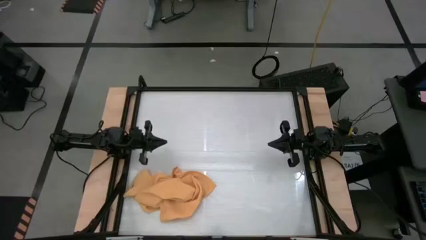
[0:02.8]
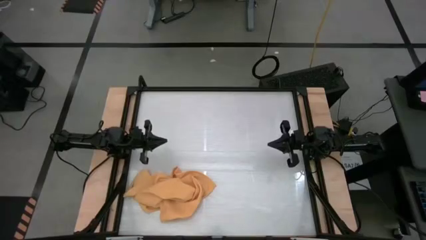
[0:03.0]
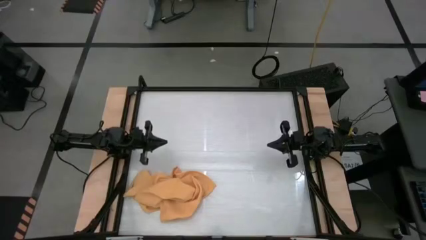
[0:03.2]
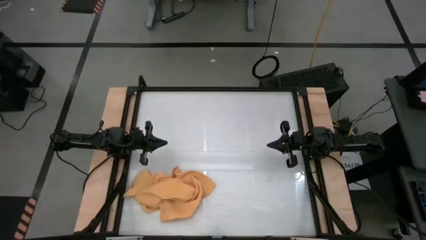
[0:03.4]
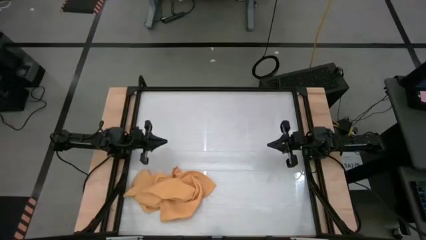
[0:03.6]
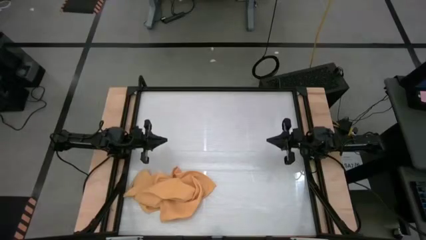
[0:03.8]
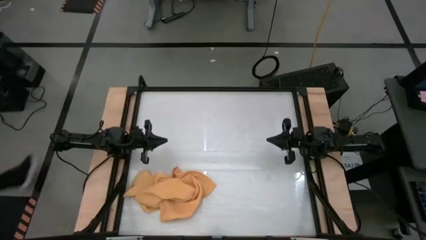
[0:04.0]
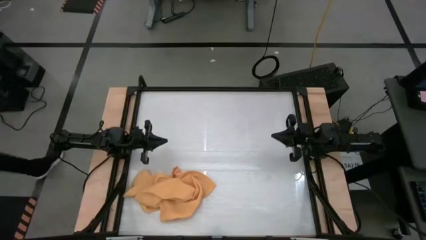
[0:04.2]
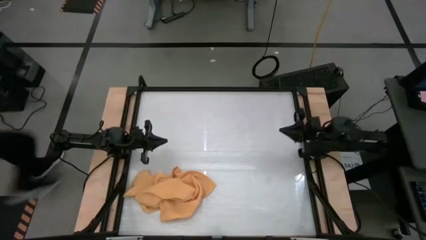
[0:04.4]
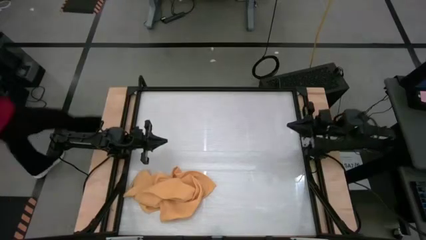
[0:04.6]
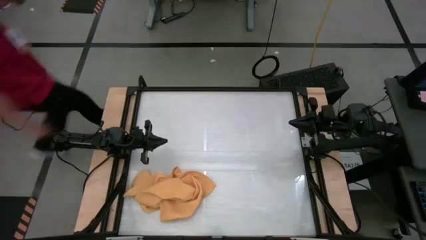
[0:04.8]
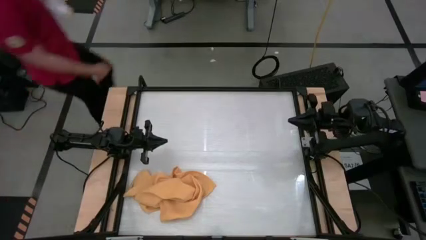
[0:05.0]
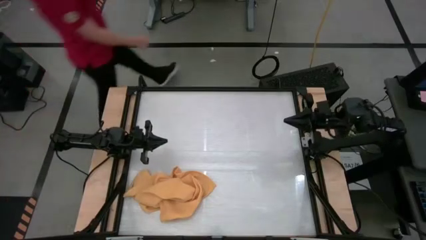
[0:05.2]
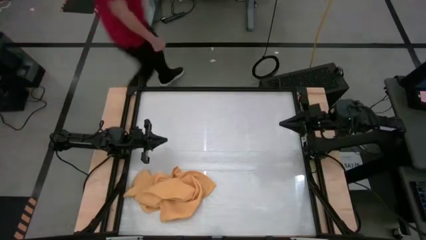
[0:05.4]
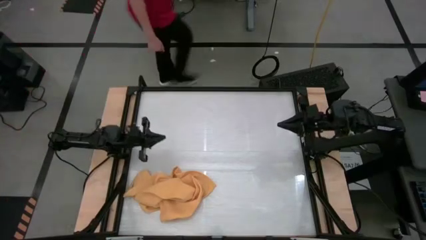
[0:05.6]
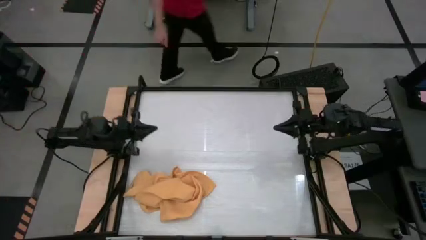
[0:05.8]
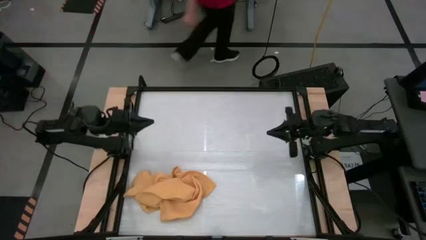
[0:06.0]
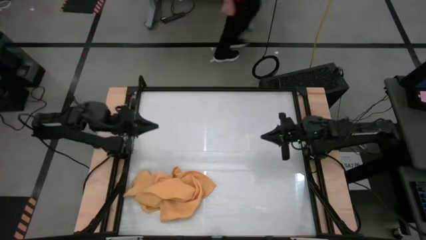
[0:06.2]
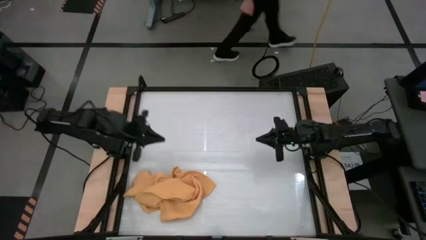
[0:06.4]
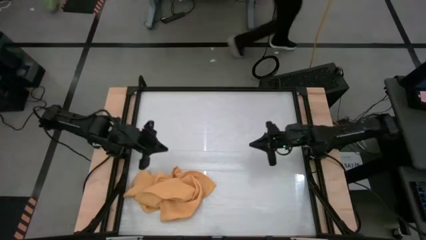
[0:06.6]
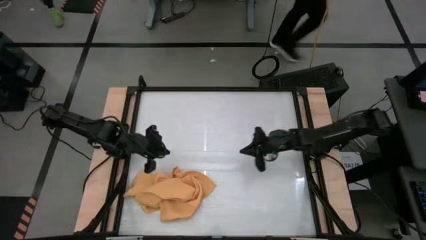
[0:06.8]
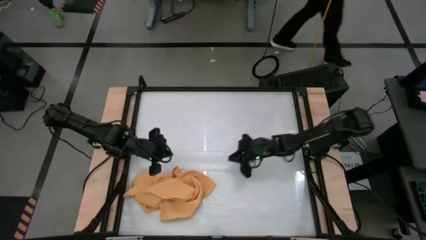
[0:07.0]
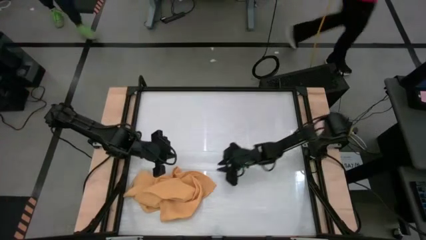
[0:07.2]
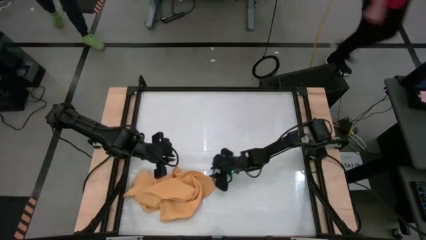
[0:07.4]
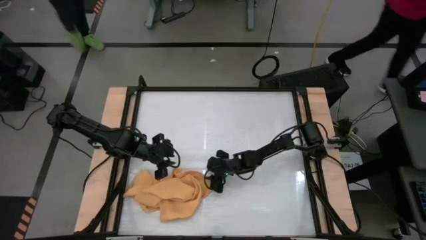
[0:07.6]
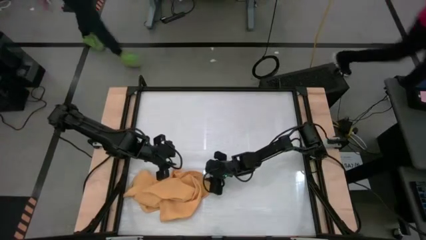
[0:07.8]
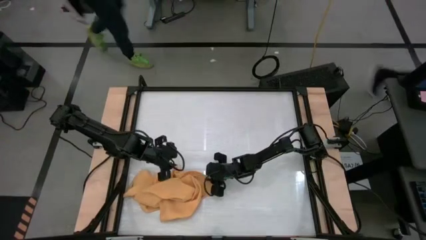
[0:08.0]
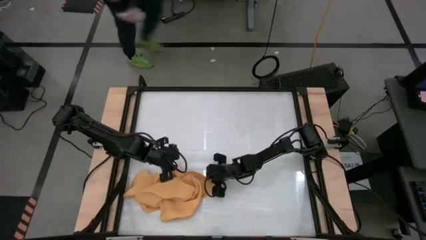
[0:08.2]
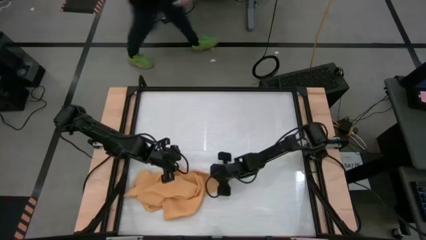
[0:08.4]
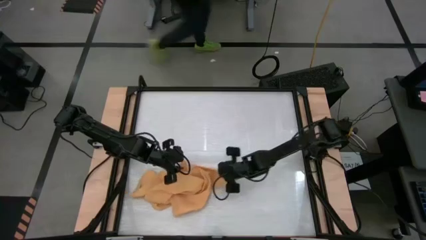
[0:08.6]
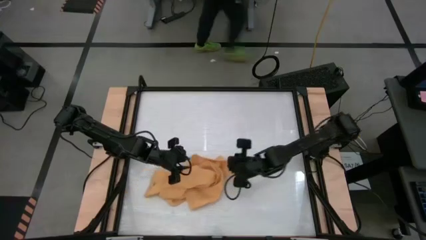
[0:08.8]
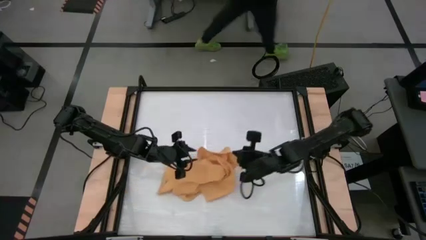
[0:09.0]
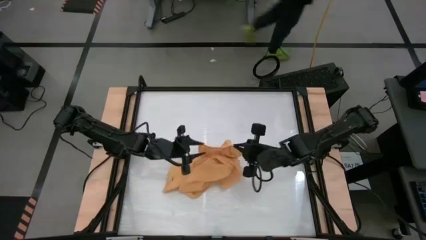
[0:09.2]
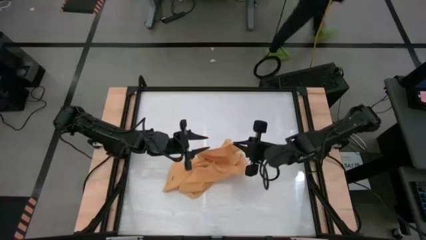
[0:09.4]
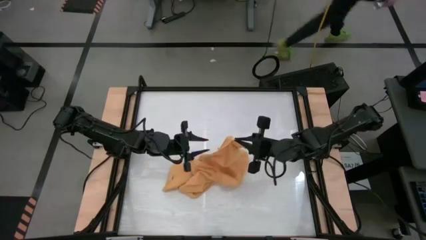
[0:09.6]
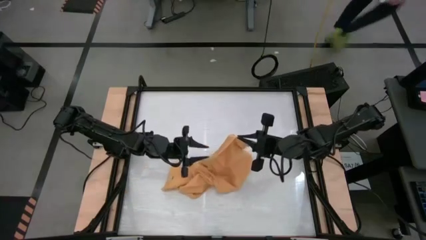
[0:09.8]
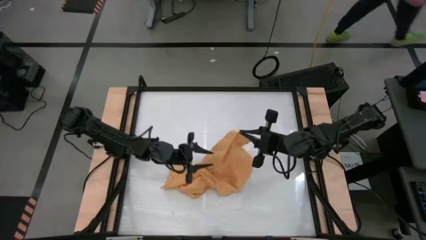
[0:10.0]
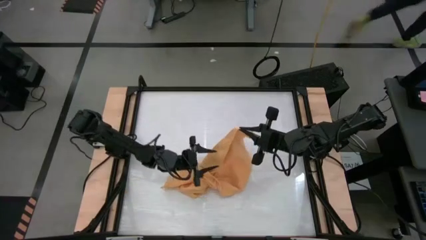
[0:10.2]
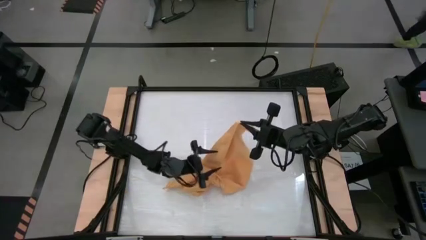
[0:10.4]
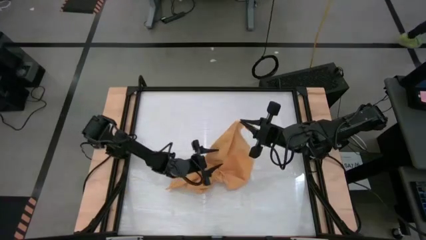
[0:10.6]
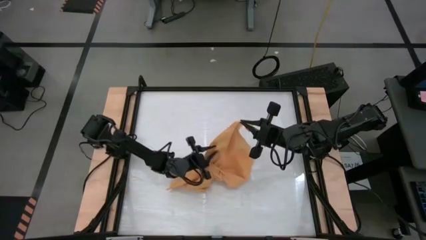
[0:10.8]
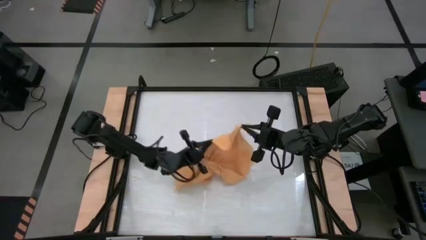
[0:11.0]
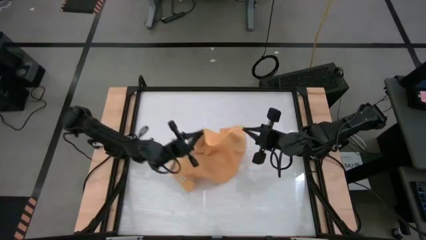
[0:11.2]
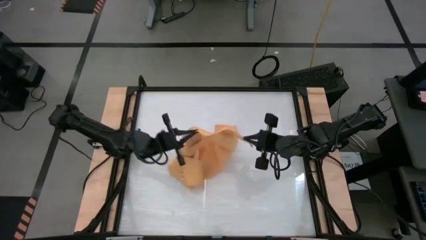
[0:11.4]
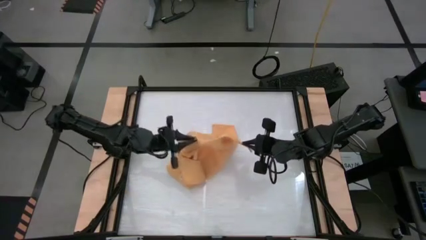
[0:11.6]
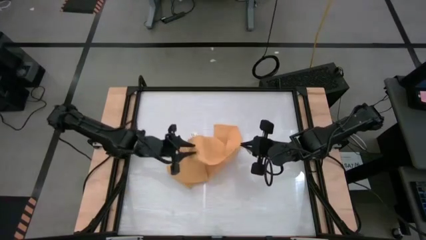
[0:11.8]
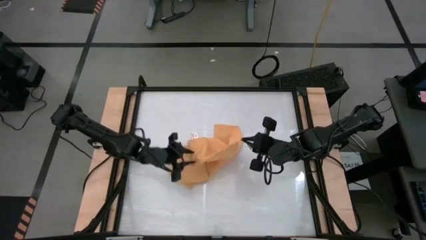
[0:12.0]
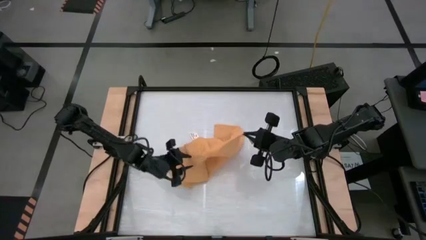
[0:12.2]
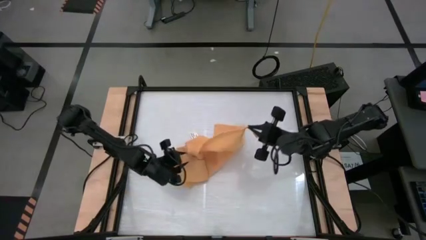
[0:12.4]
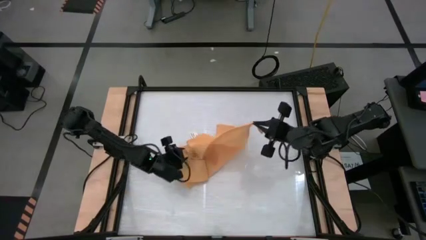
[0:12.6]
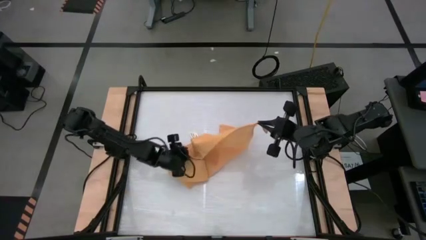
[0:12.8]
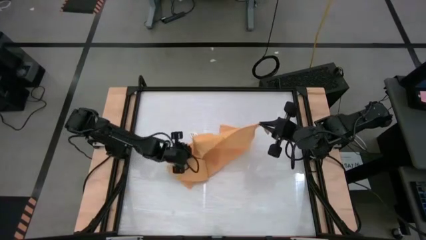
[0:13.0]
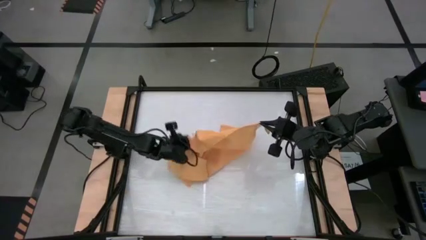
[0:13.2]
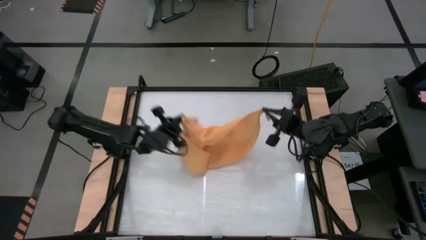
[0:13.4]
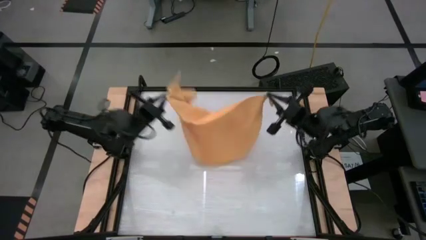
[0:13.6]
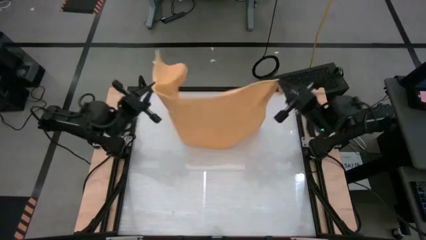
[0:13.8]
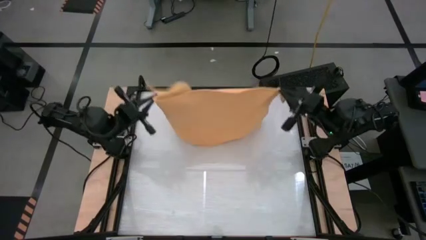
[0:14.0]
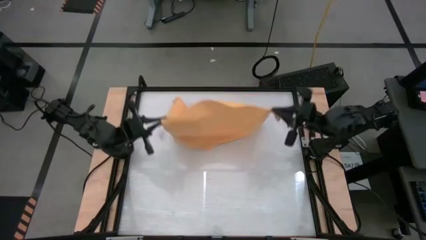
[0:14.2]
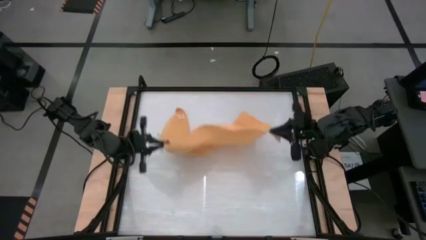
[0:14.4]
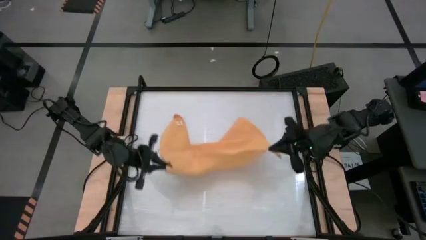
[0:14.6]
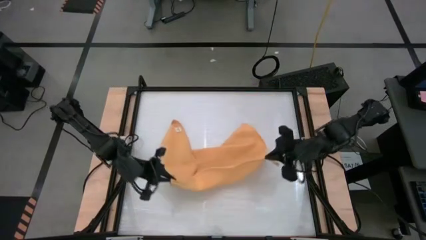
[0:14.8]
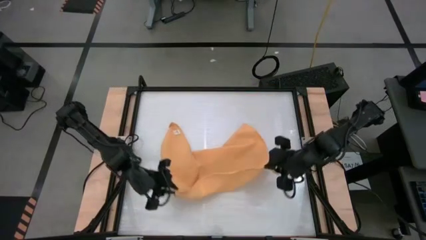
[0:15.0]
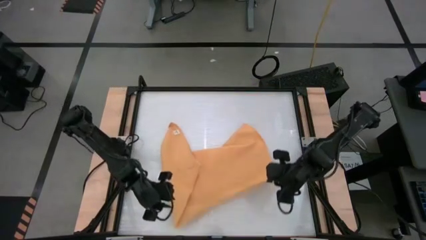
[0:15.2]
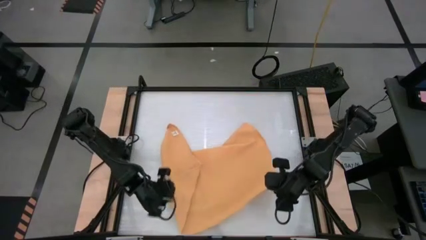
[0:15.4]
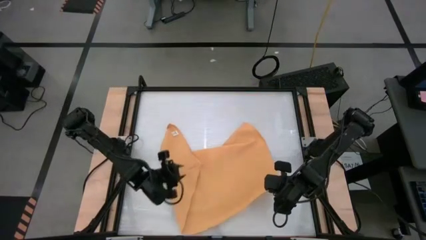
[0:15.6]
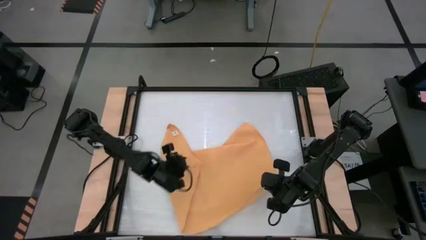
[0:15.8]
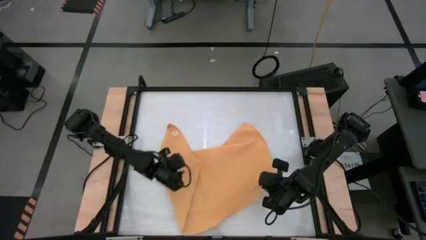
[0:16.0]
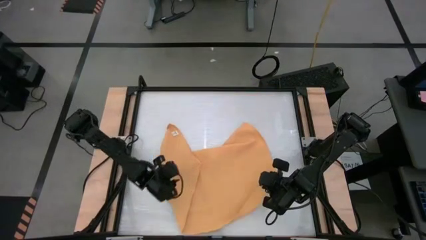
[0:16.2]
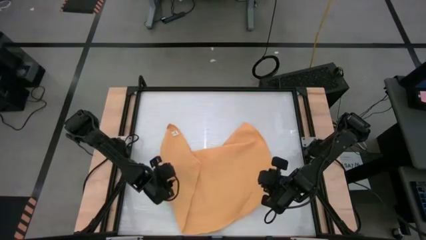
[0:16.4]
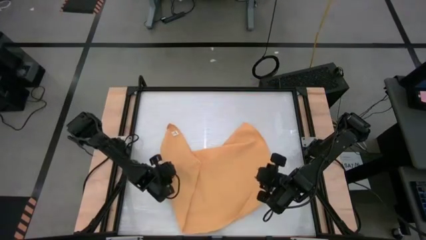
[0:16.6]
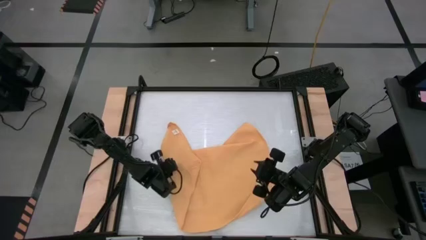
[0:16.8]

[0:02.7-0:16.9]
Task: Roll towel
Roll the yellow towel

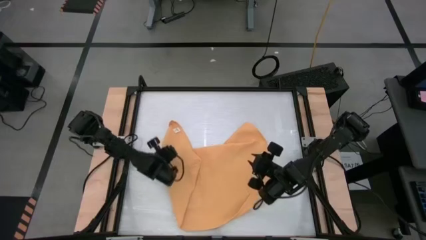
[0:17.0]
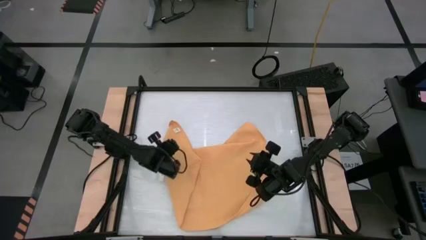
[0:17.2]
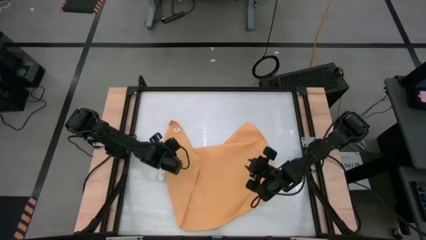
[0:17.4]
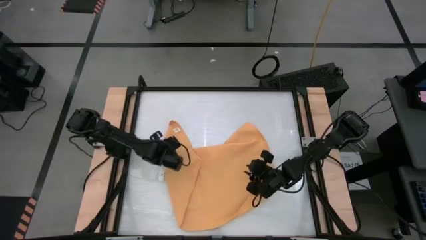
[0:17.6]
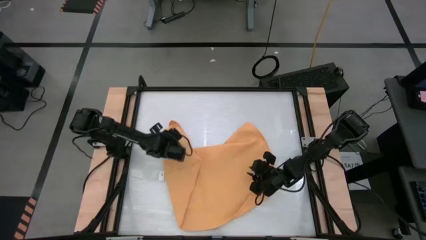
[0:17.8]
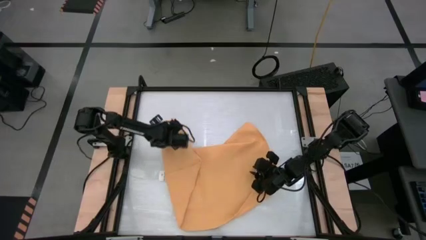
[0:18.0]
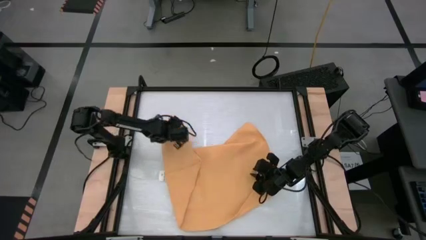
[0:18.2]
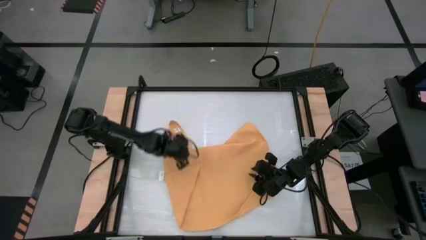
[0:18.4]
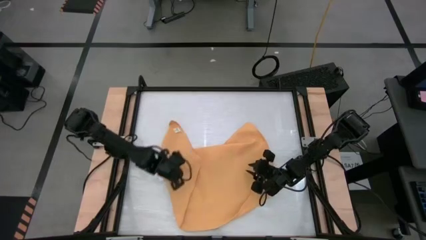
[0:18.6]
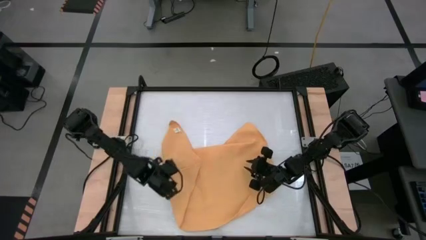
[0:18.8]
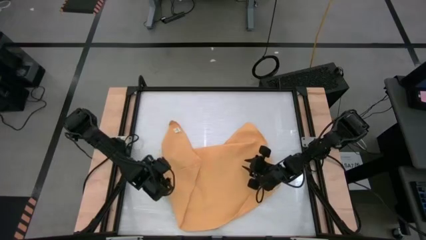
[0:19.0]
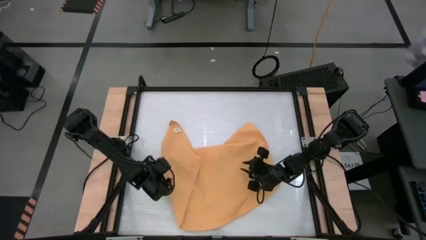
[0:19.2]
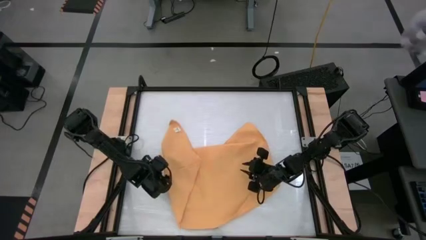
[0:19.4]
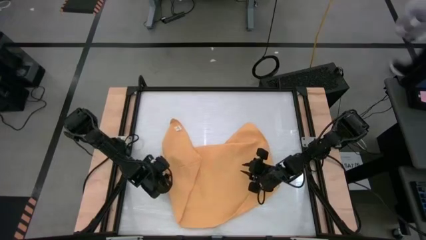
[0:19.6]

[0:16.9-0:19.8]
Roll the yellow towel
